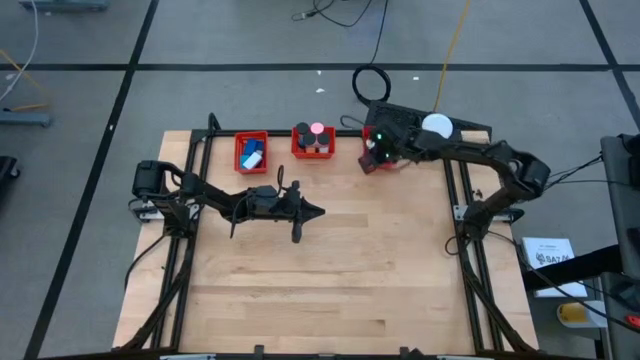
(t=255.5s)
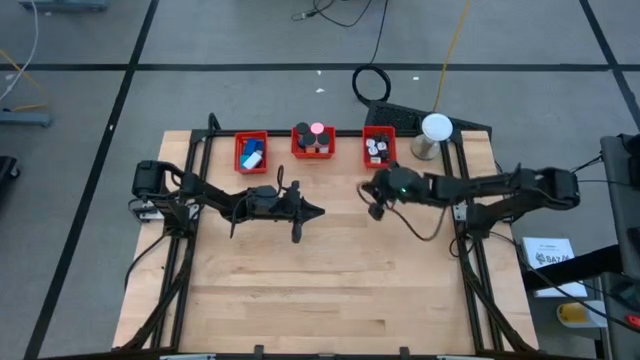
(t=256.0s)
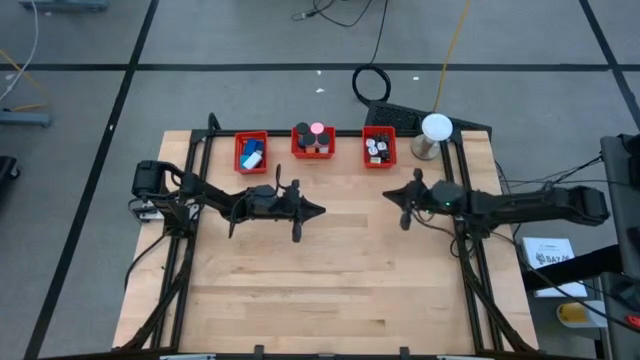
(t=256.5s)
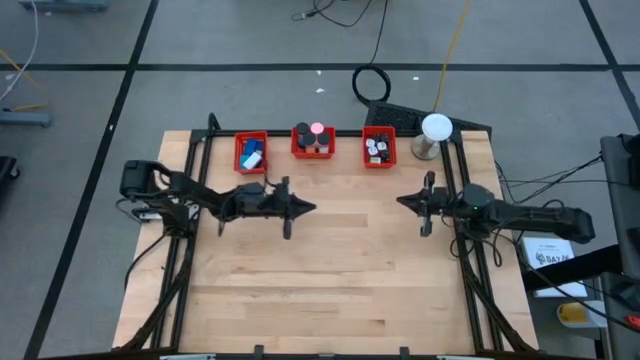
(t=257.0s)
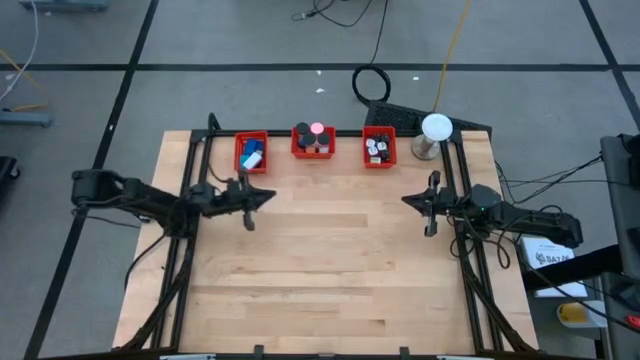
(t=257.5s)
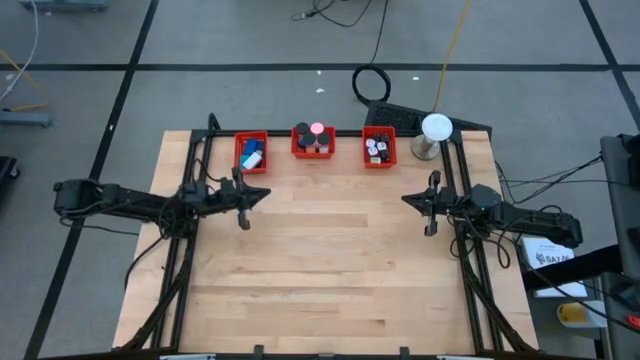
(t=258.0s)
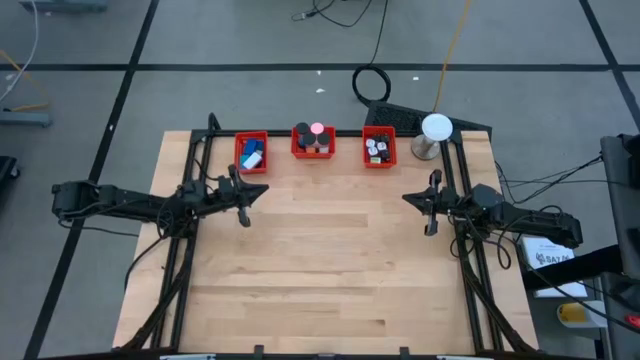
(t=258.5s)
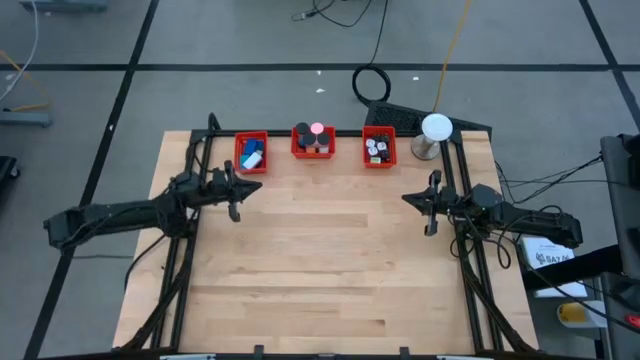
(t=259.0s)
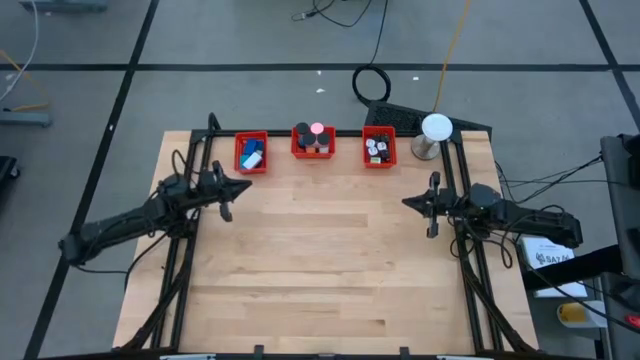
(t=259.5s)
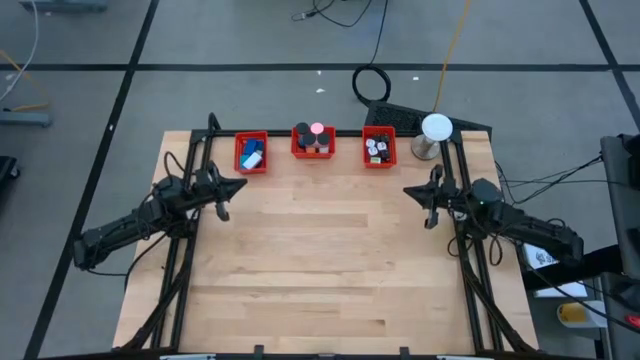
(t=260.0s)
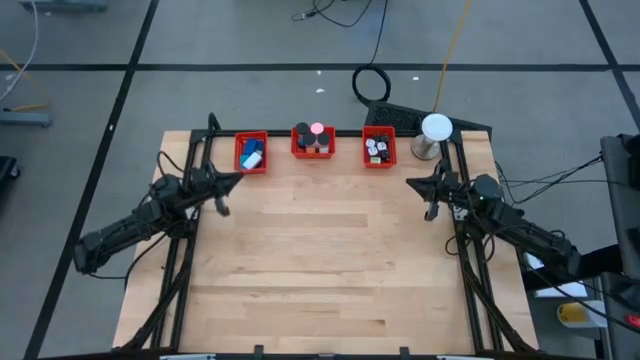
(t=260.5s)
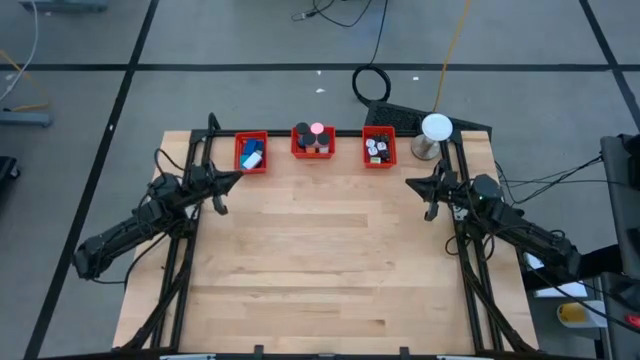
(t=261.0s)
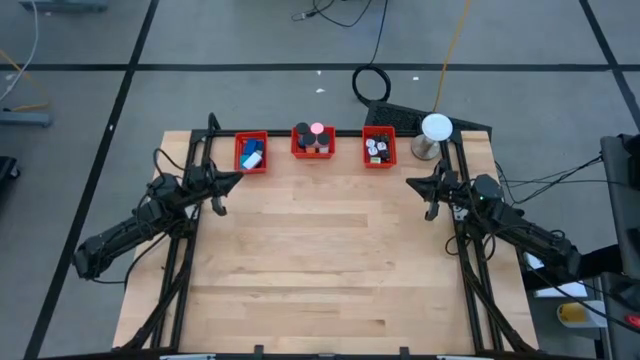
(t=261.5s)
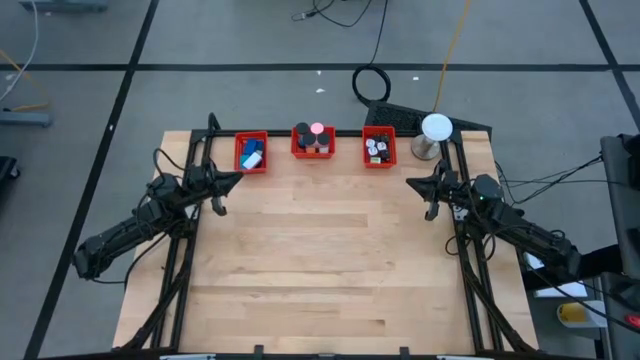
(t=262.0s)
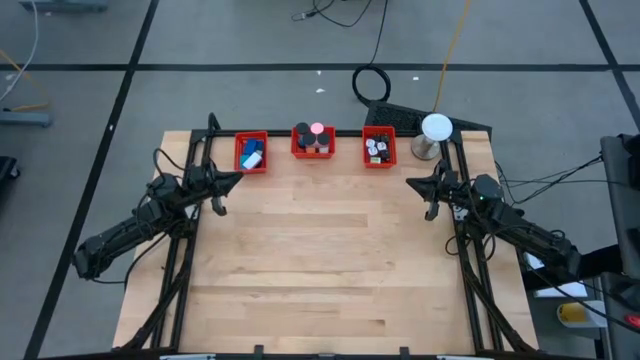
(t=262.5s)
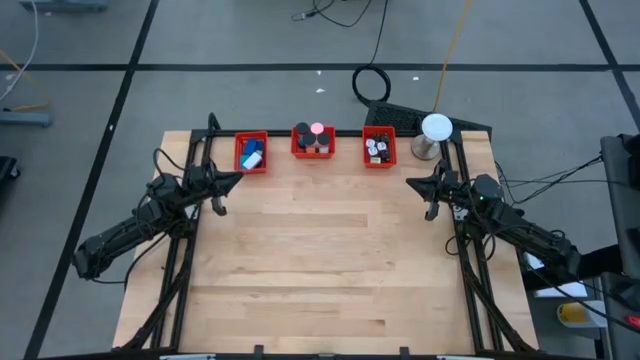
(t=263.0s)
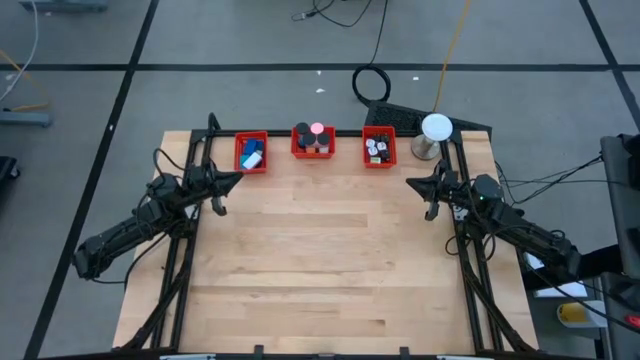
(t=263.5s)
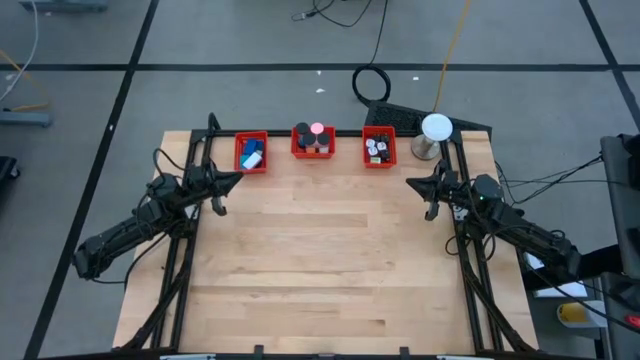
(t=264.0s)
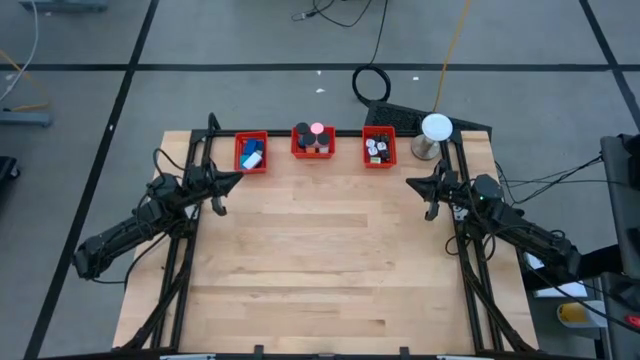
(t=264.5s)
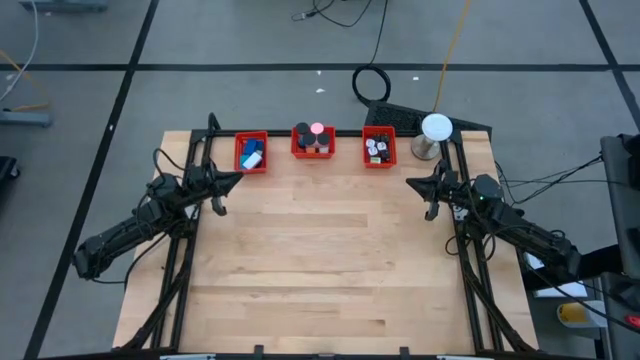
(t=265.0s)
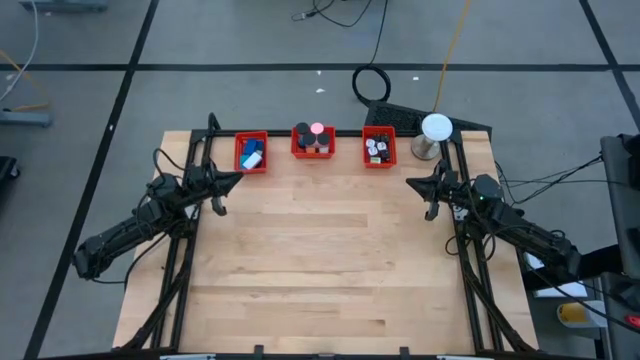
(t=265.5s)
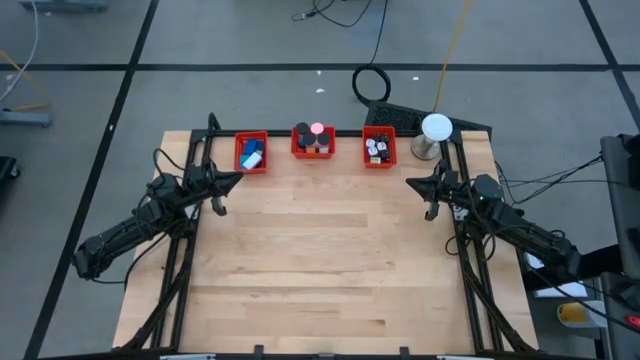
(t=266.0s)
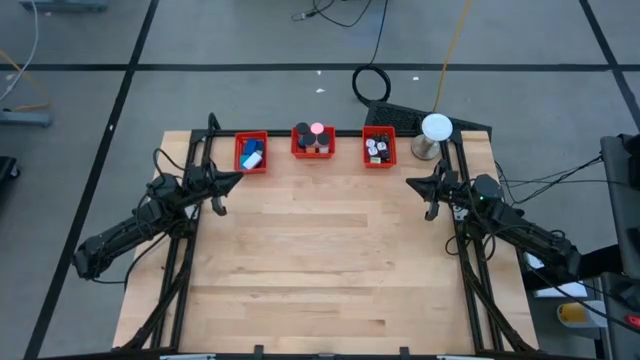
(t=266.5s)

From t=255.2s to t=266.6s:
Task: Pick & Place Office items
Return to Home Position

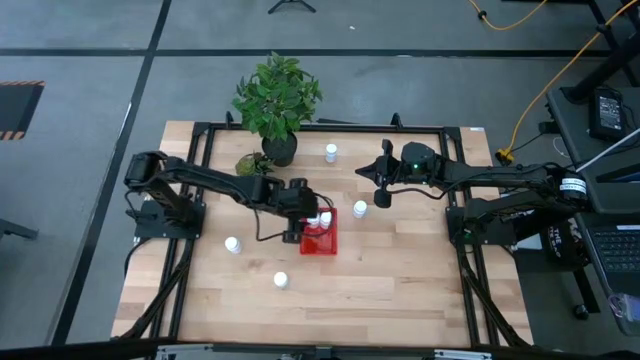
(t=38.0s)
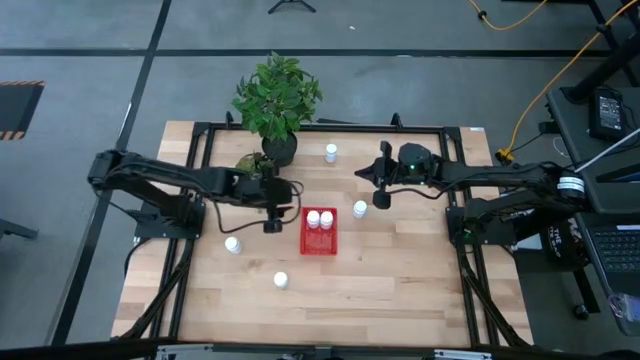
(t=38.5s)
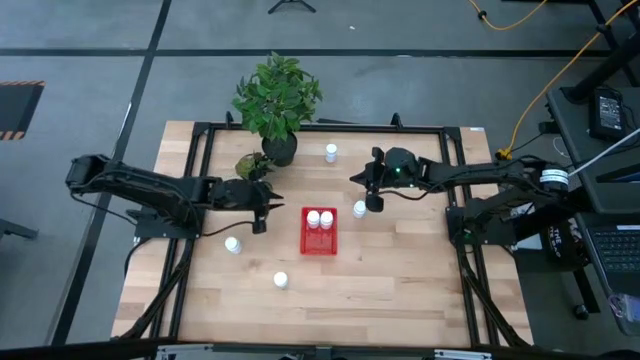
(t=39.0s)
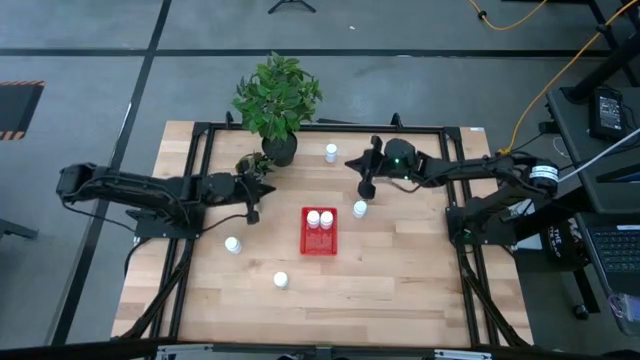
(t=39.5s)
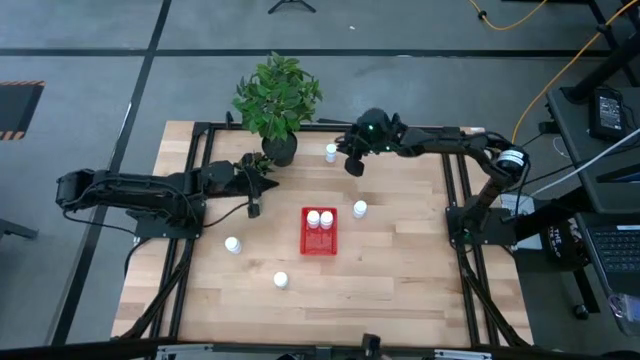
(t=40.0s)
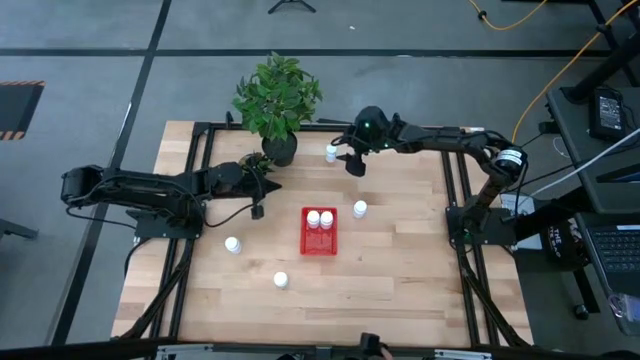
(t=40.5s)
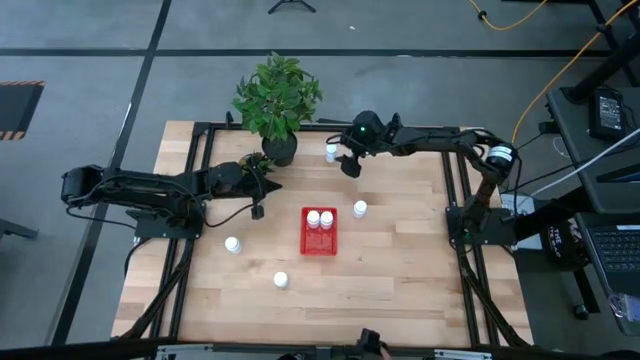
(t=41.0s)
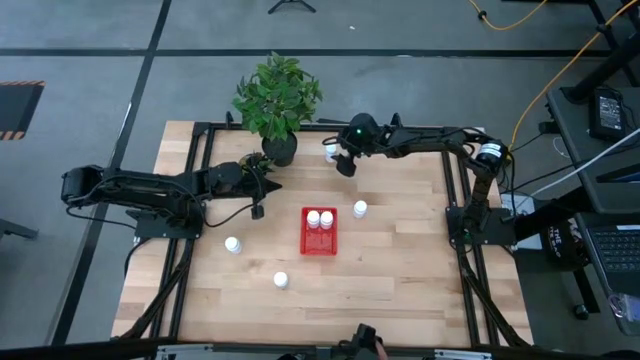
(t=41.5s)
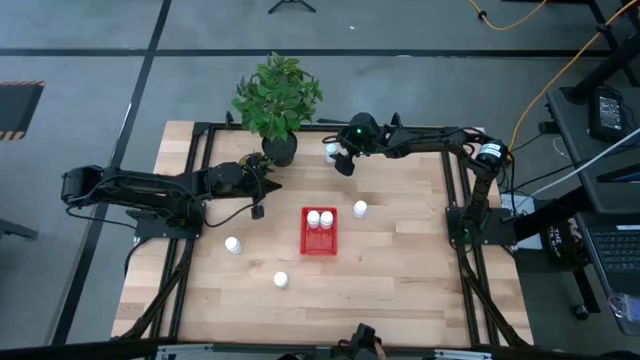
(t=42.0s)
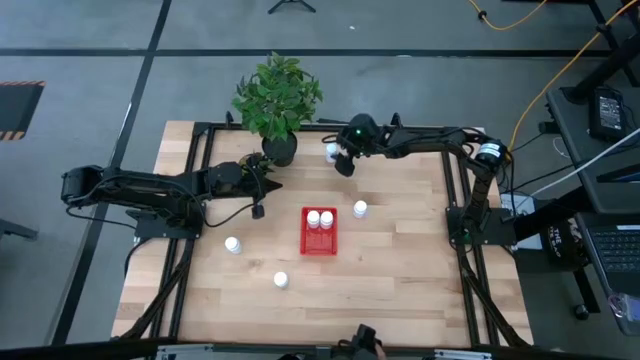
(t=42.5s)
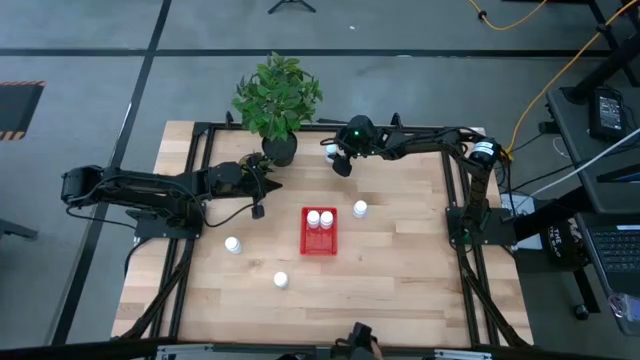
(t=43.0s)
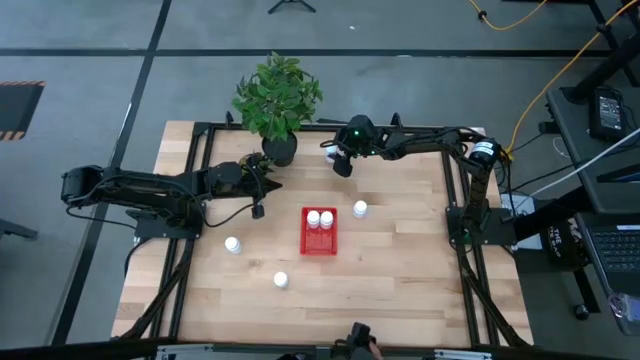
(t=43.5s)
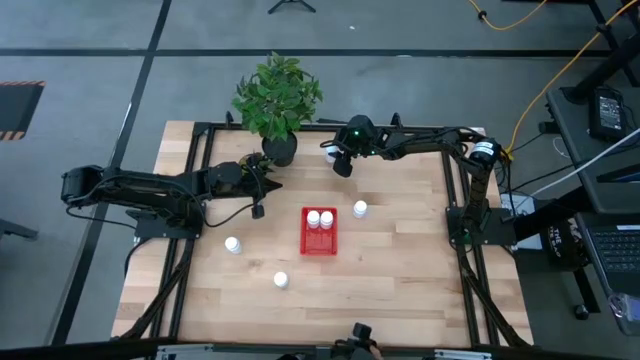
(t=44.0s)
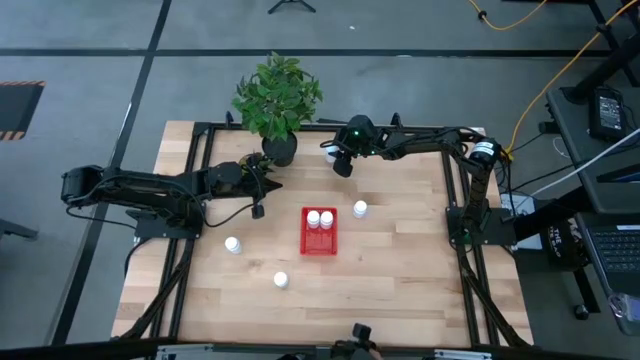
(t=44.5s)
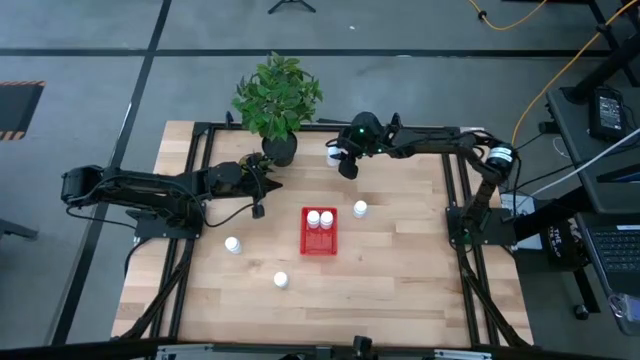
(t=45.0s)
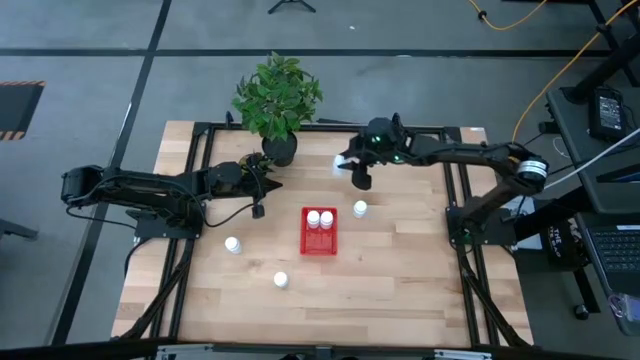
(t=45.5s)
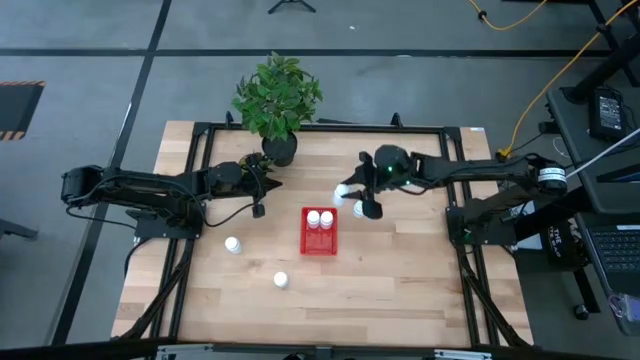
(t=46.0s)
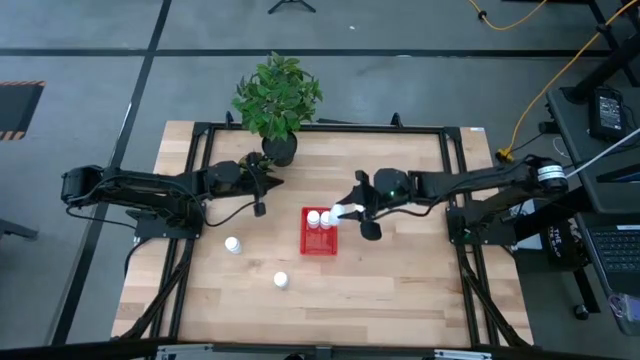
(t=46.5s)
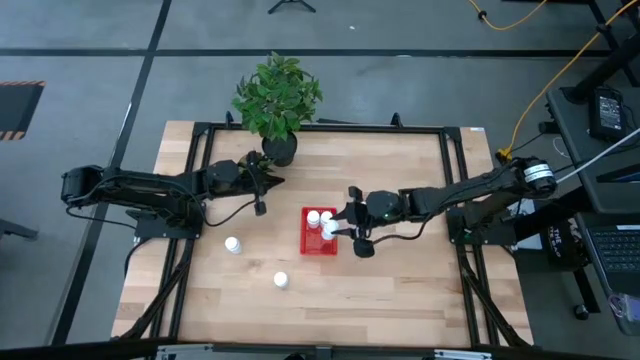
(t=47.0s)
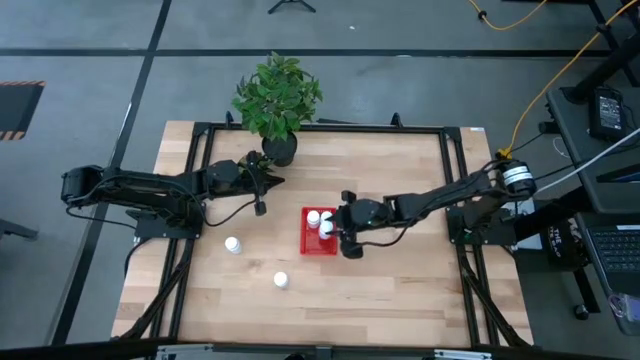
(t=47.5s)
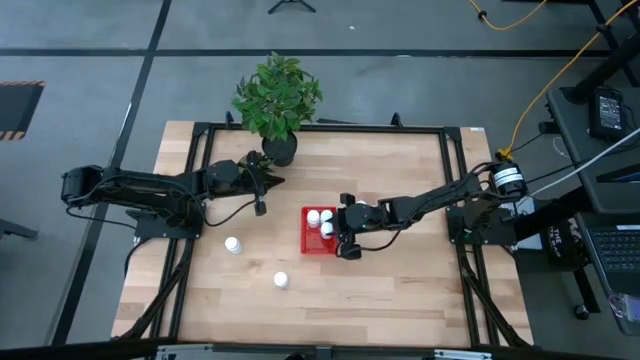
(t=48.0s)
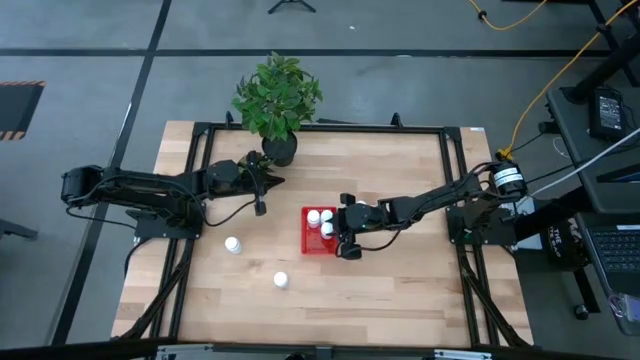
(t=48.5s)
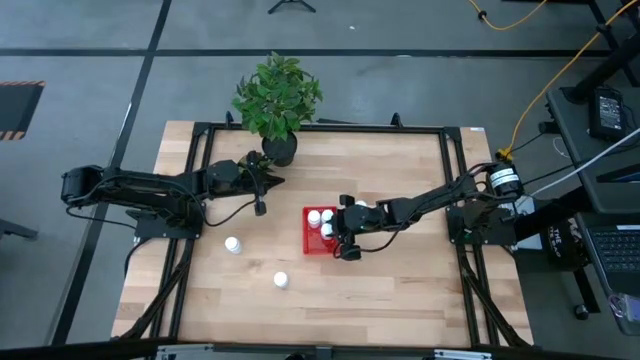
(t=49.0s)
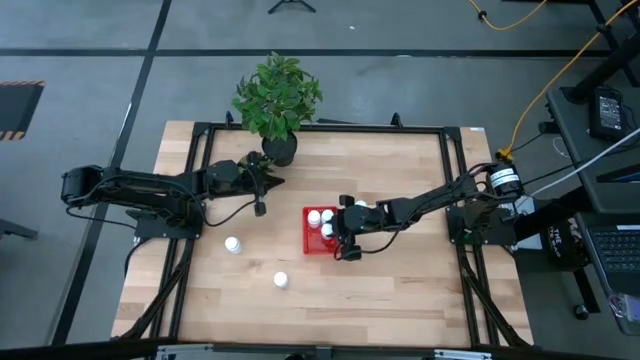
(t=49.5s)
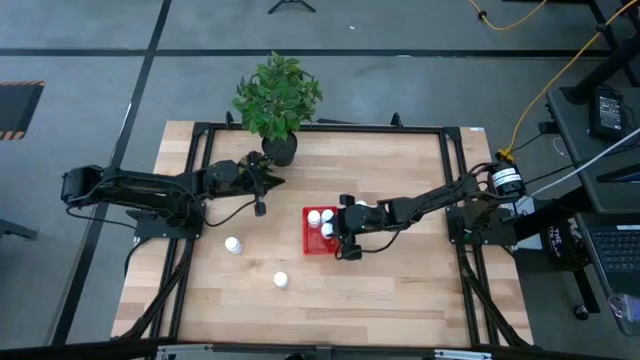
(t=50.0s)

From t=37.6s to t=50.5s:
Task: Pick and place pill bottles into a basket
Put the white medicine bottle into the red bin
